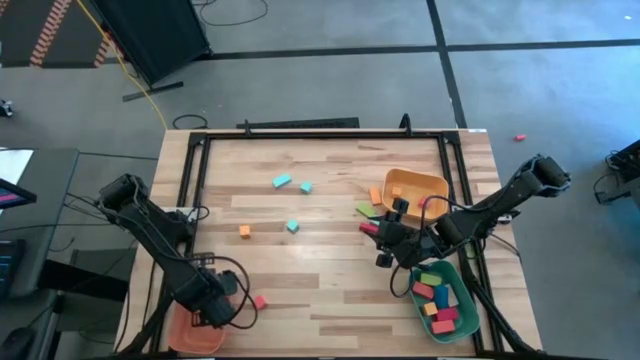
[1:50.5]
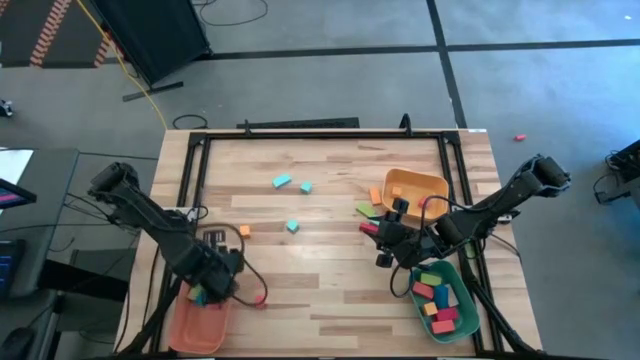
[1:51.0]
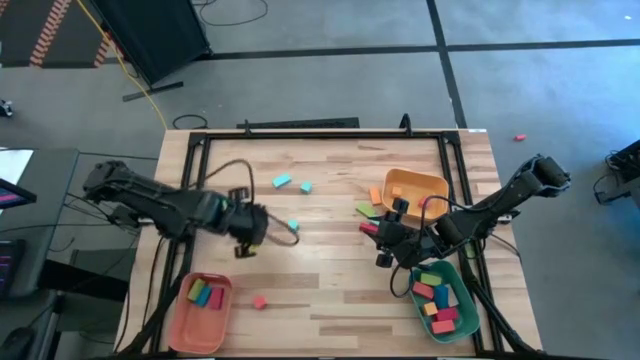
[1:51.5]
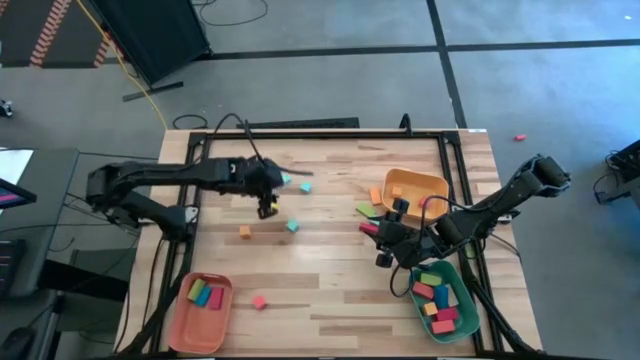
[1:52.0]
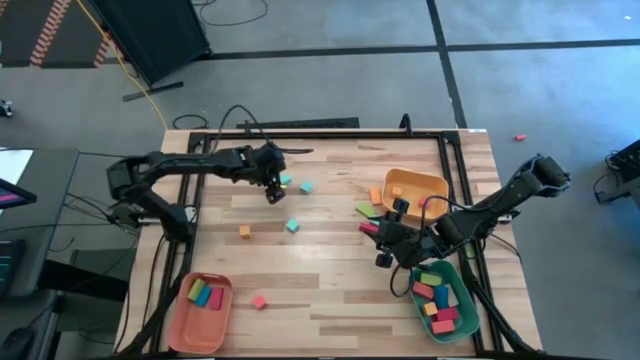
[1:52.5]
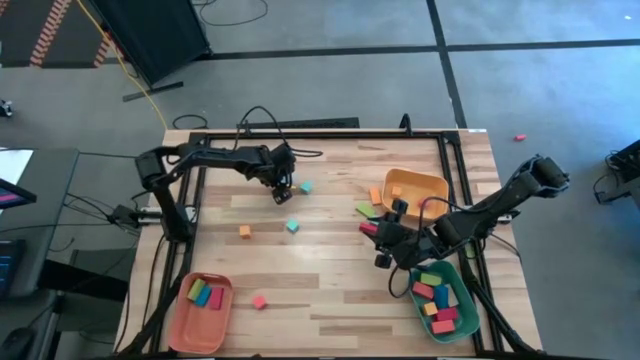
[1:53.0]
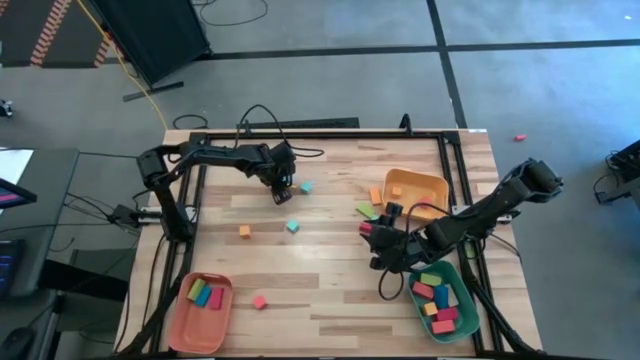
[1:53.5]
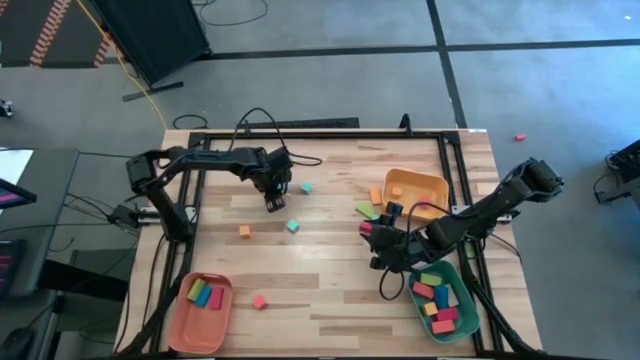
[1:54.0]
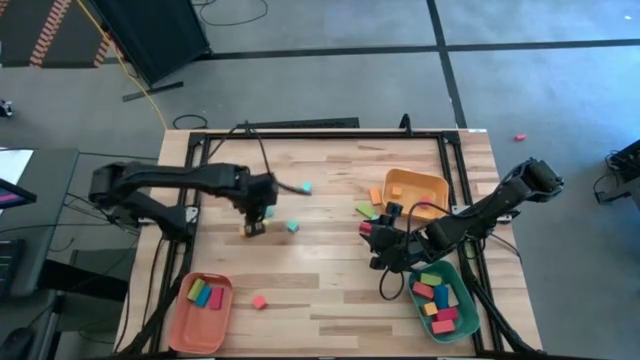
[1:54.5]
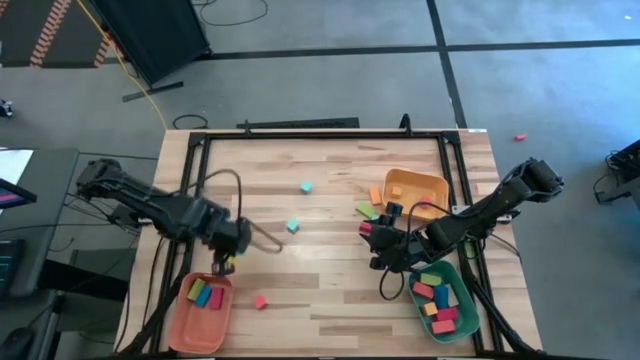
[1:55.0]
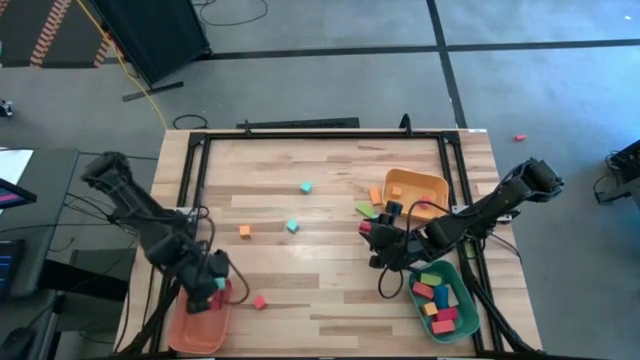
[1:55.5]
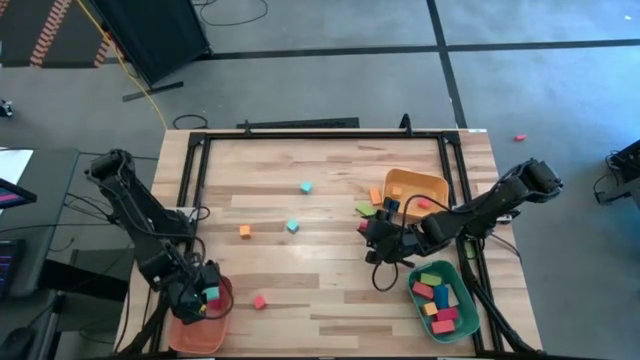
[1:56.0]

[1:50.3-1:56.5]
Task: Sort blocks by size
Put the medium light blue block into the orange bin

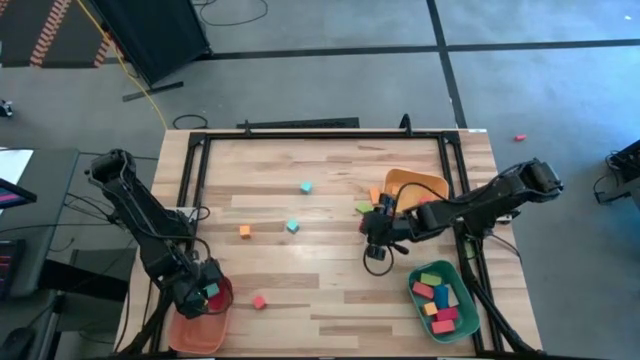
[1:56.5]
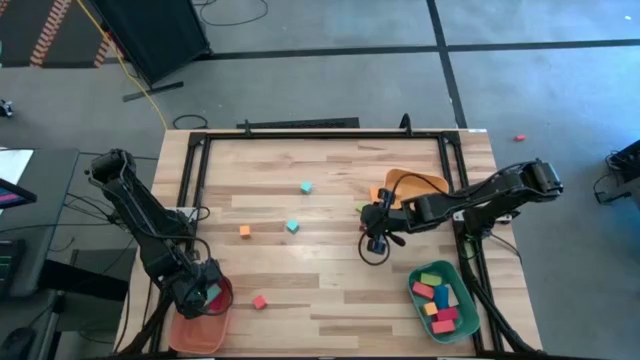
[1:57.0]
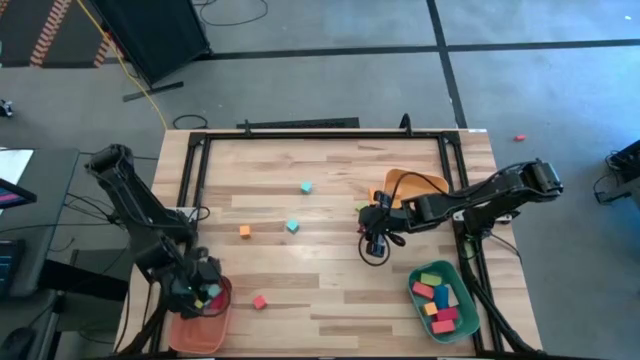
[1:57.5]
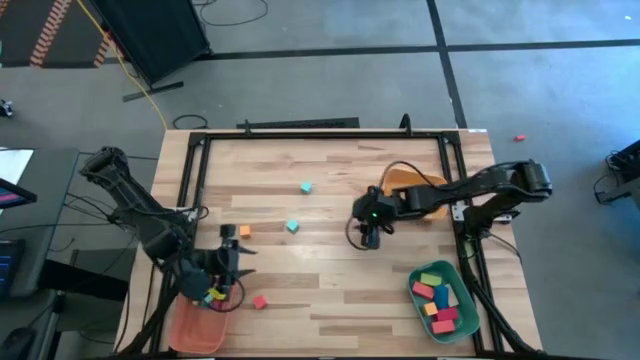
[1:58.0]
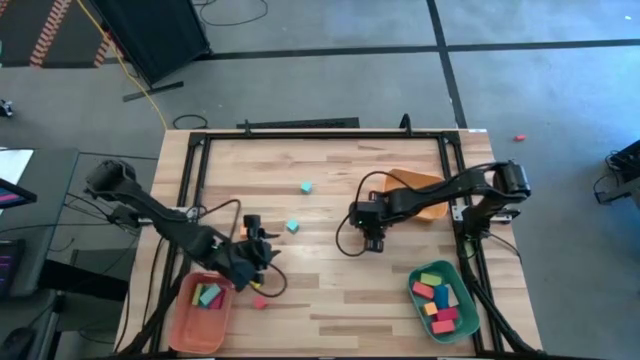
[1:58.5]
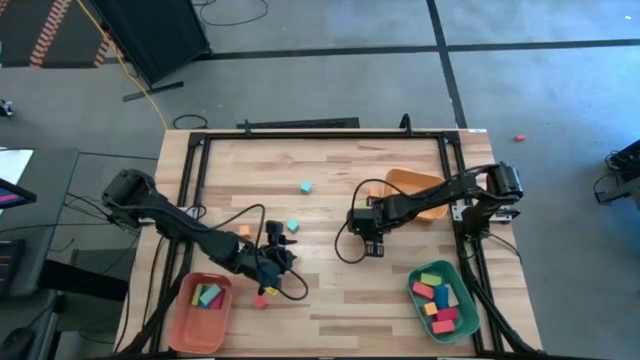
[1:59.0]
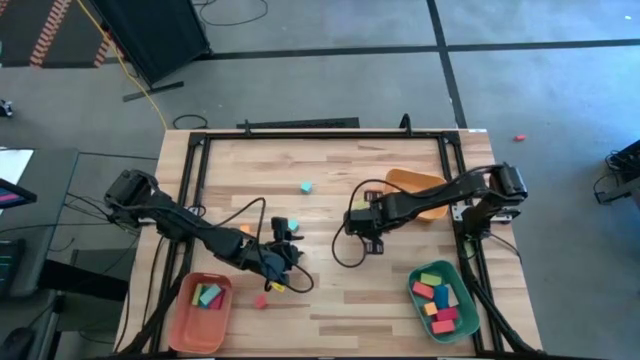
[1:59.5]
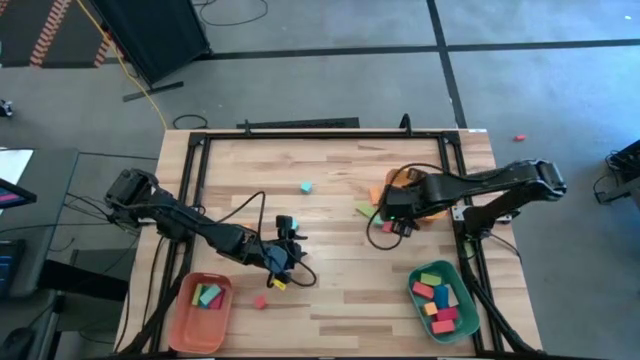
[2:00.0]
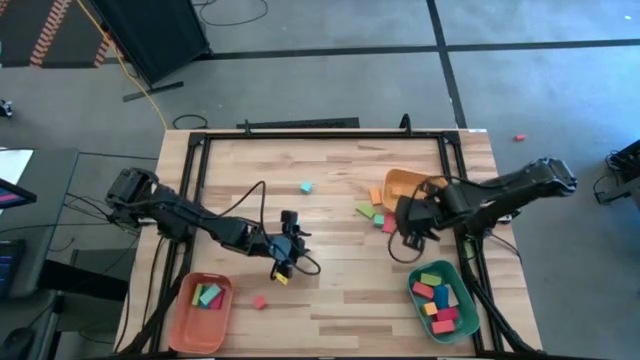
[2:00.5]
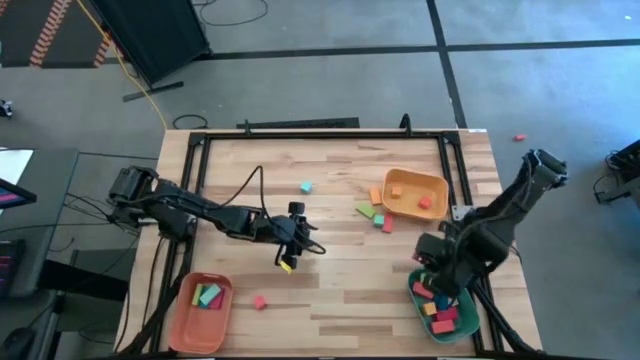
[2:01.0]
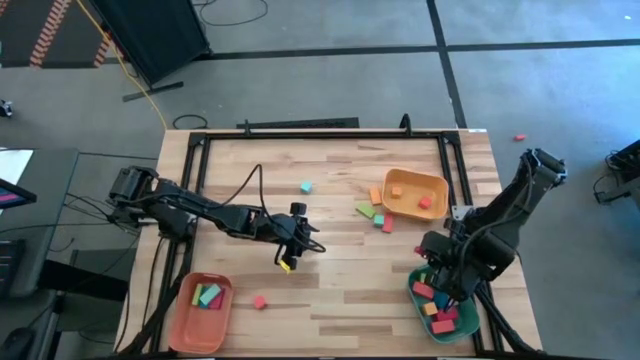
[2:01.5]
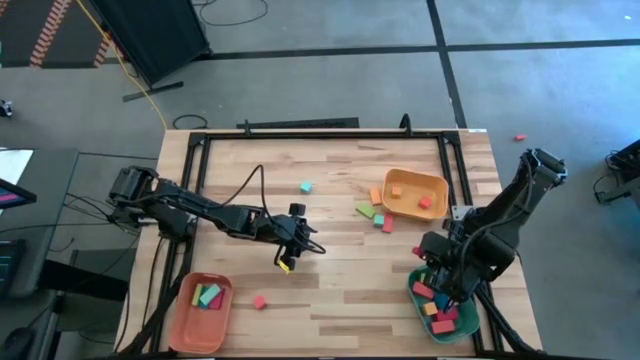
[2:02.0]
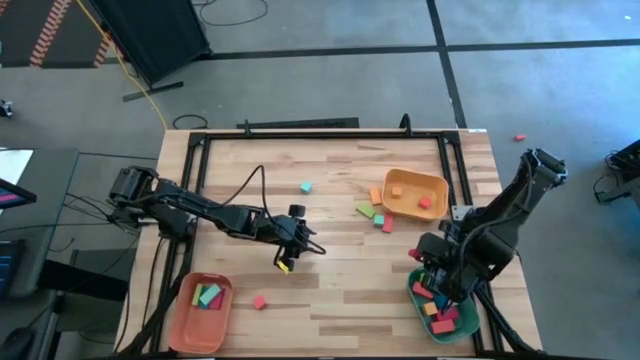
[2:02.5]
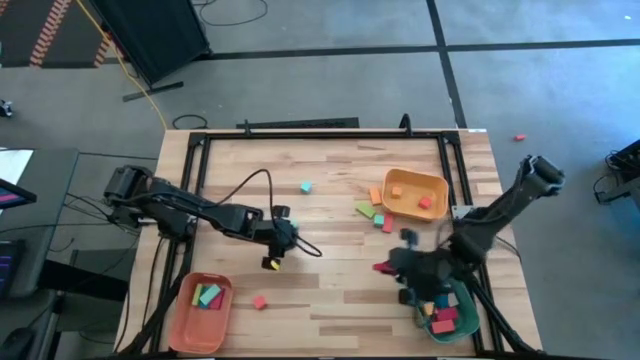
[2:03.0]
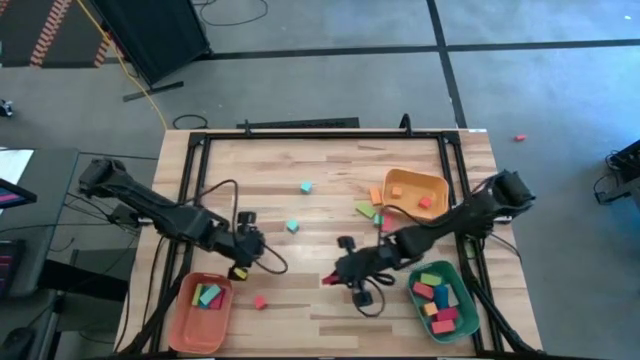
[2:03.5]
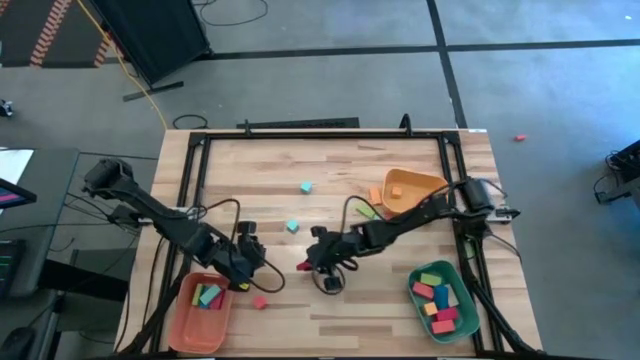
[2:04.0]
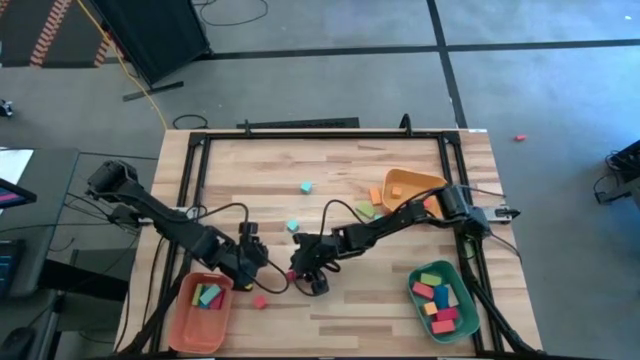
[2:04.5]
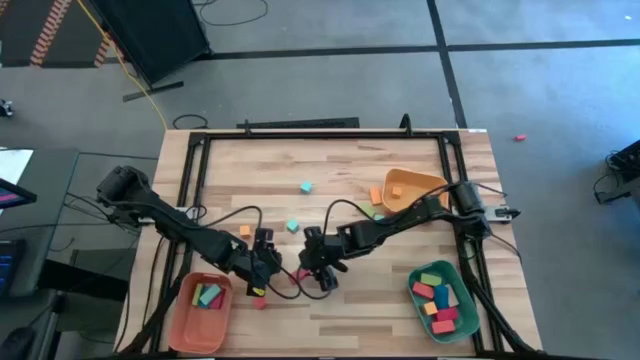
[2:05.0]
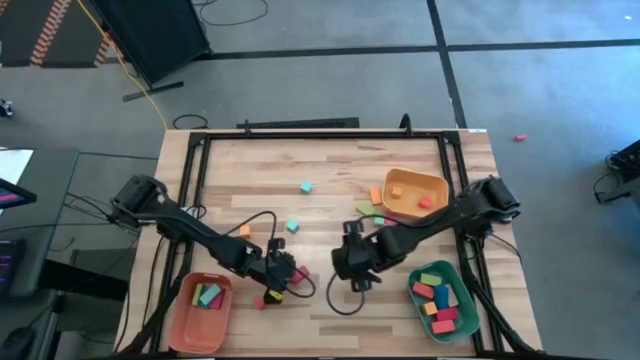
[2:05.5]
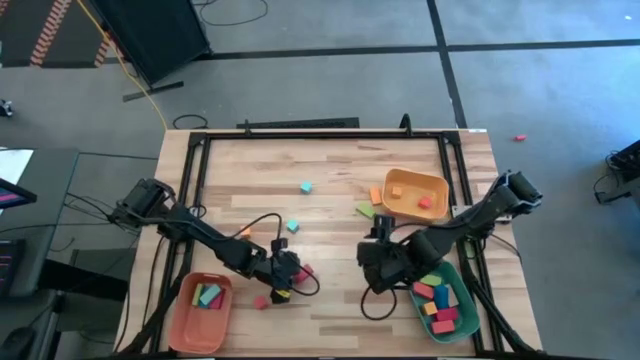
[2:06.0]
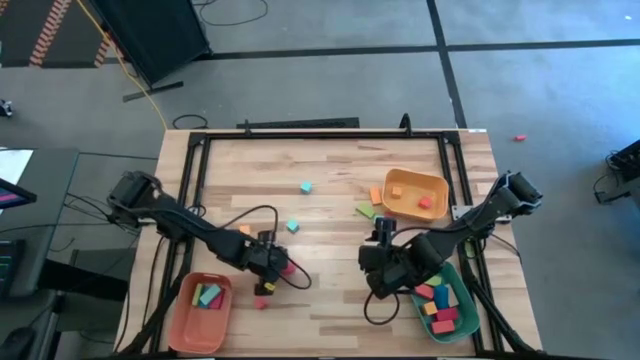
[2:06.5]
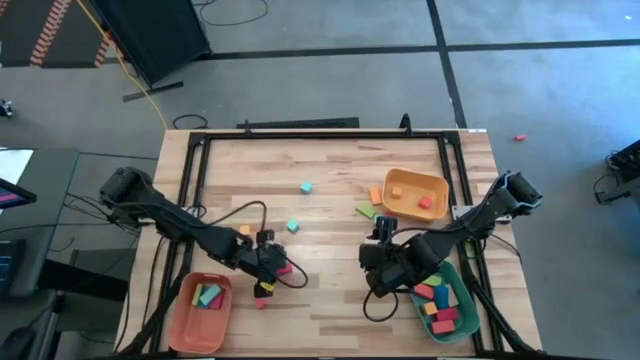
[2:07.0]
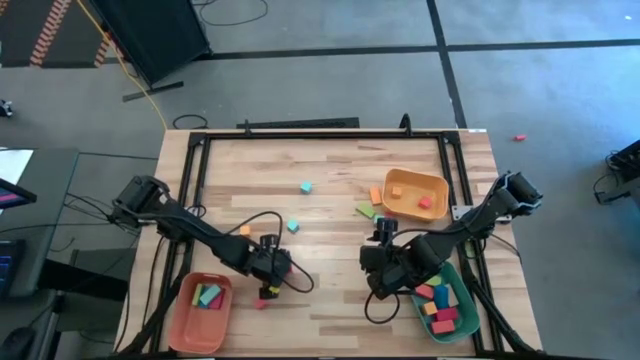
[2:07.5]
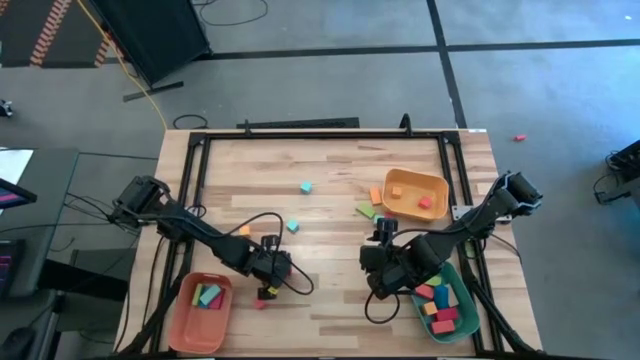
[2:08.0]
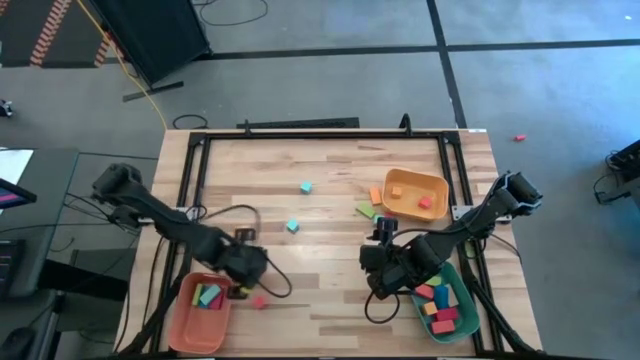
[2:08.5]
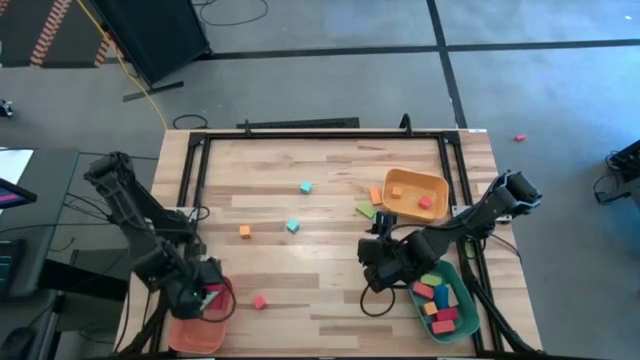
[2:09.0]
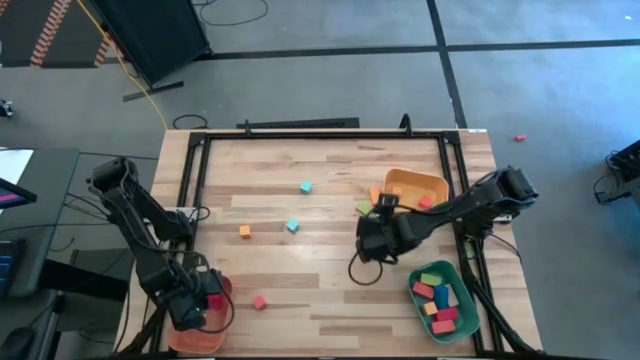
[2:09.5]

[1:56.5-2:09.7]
Put the medium red block into the orange bin

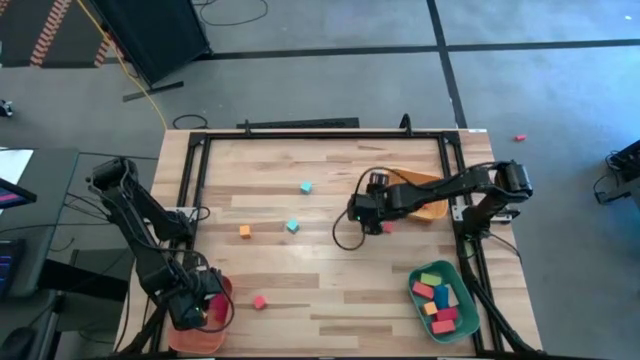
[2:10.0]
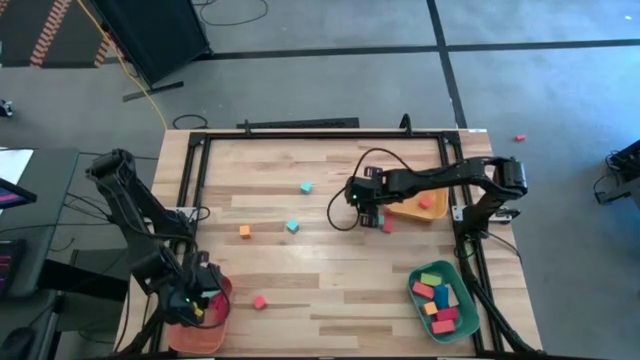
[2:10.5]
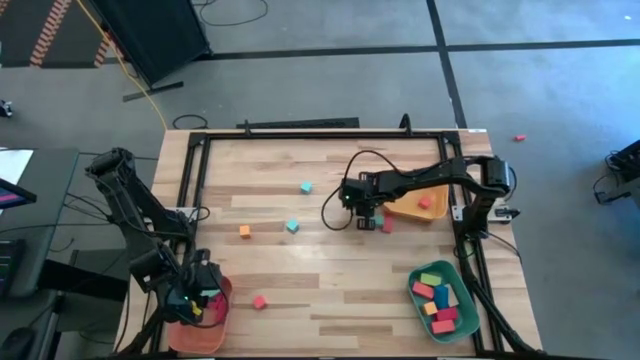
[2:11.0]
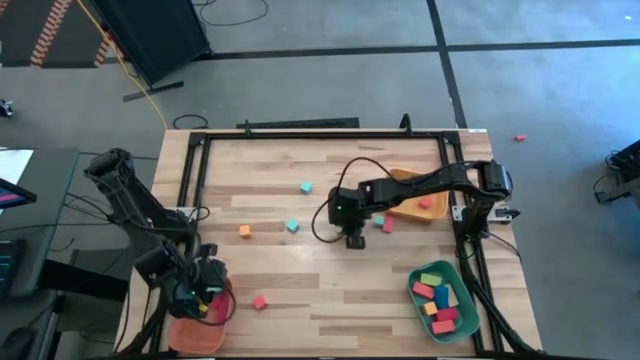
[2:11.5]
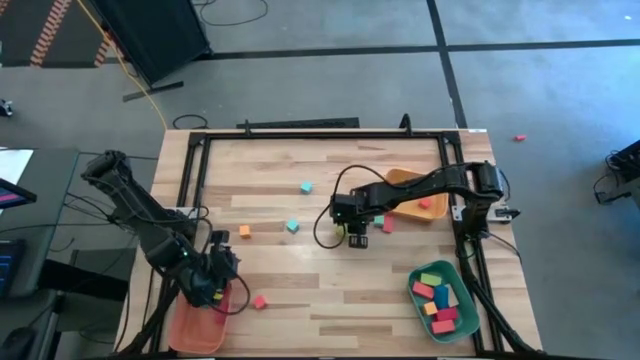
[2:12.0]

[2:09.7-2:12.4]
Put the medium green block into the orange bin
